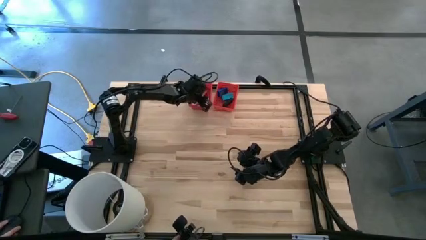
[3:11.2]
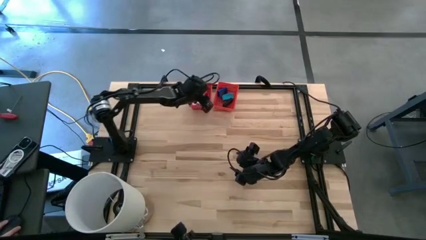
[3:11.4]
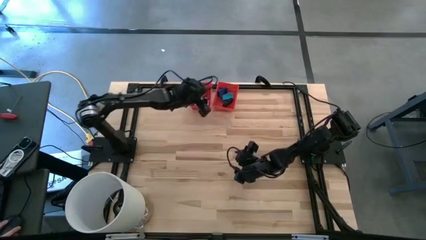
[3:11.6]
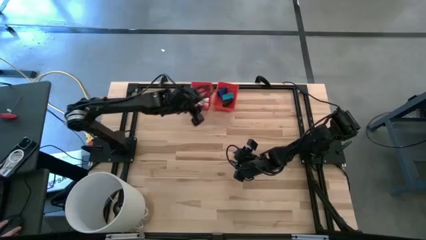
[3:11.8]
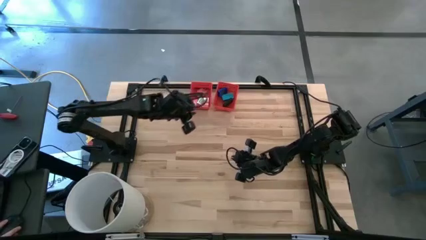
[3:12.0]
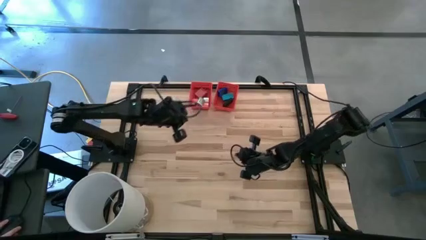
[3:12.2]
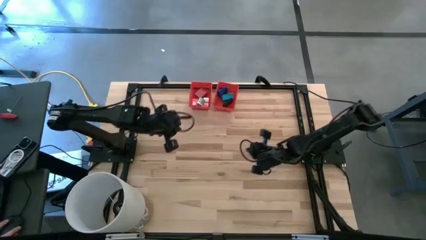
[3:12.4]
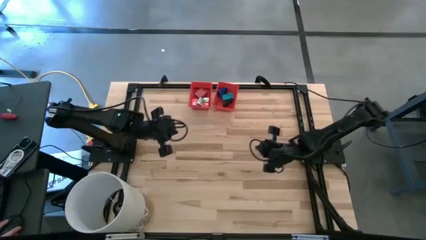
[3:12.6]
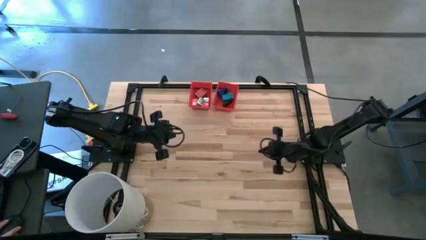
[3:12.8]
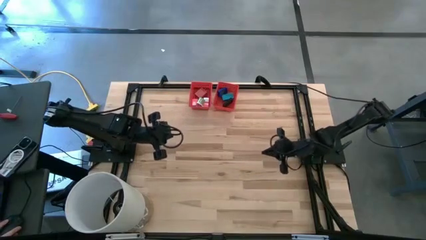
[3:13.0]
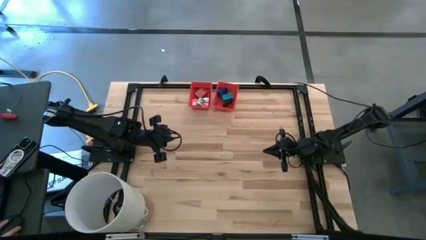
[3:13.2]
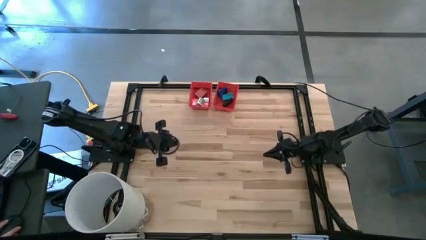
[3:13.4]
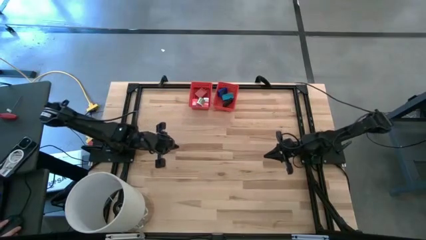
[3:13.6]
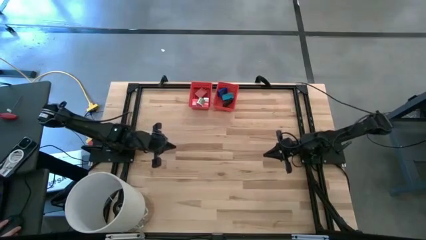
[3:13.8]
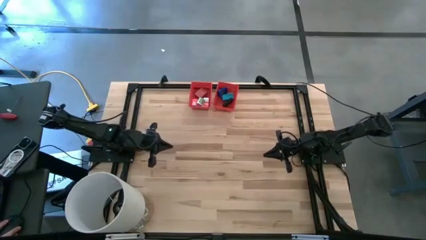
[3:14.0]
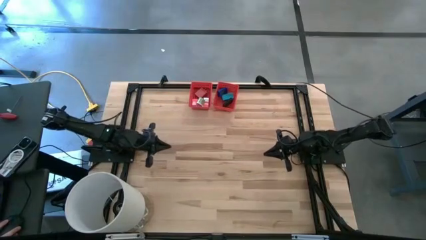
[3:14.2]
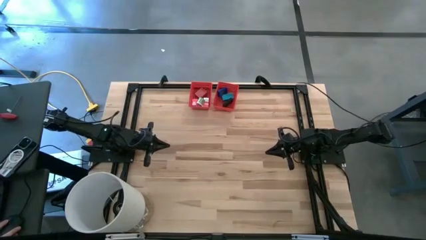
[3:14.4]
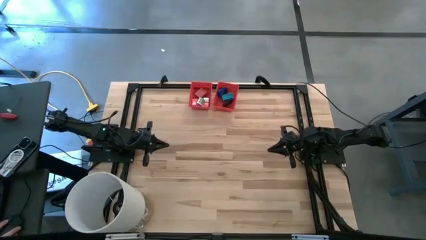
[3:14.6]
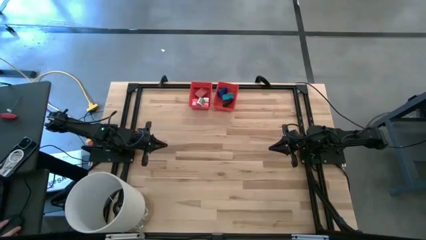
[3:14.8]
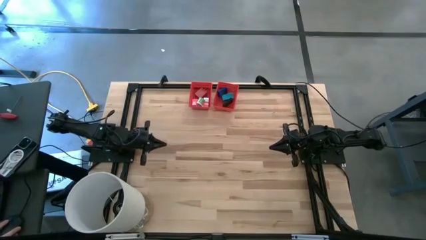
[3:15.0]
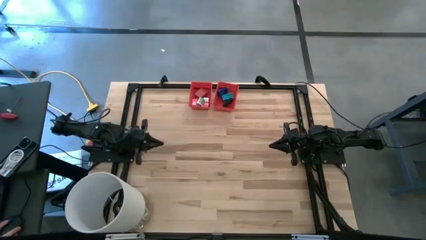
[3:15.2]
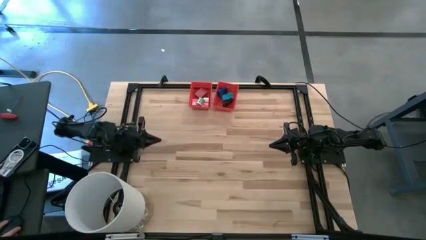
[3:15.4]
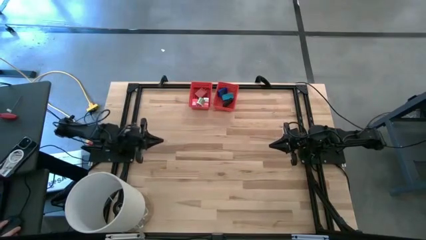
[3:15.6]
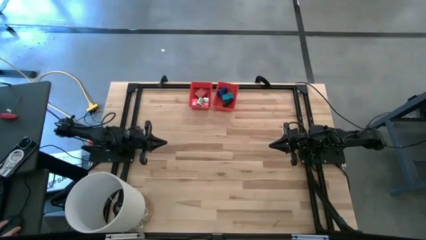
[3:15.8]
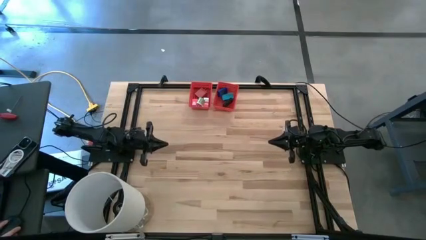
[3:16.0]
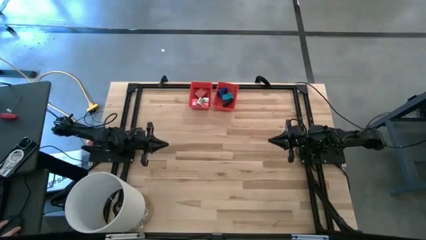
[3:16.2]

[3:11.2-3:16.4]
Task: Pick & Place Office items
Return to Home Position

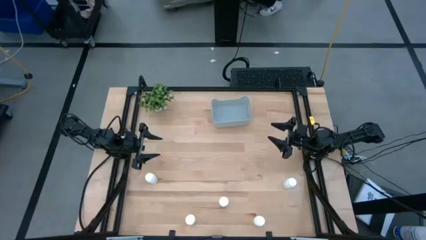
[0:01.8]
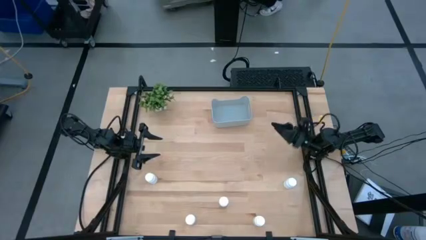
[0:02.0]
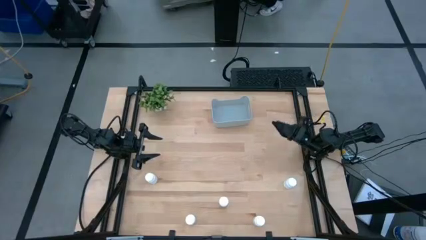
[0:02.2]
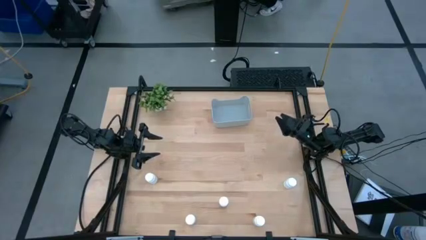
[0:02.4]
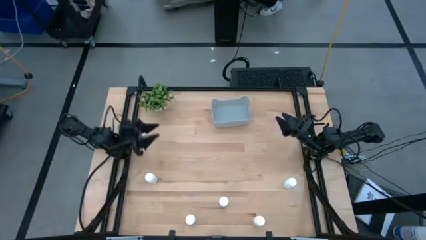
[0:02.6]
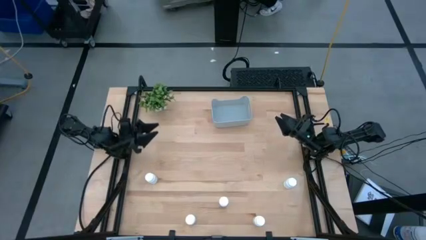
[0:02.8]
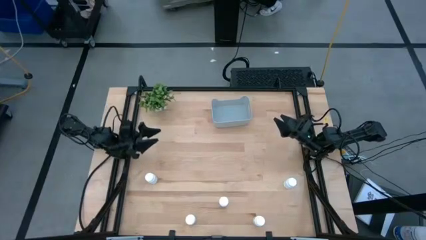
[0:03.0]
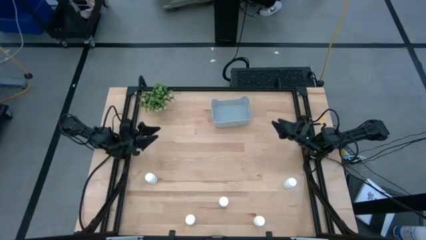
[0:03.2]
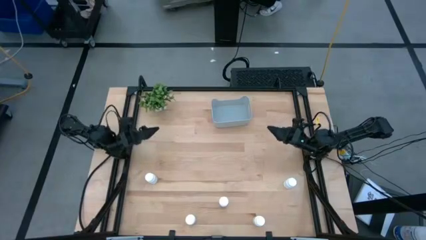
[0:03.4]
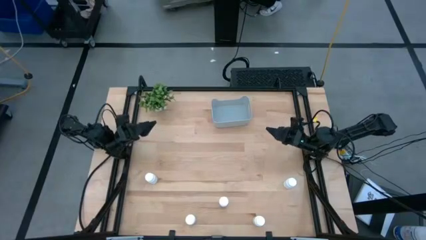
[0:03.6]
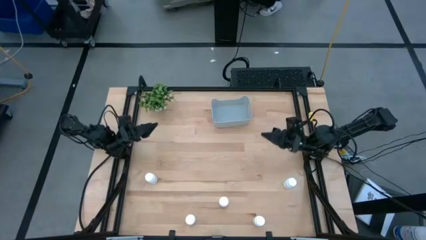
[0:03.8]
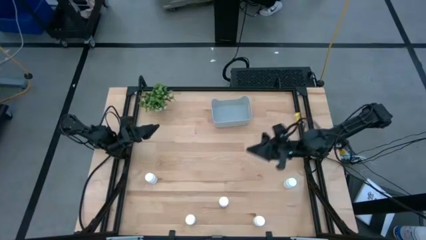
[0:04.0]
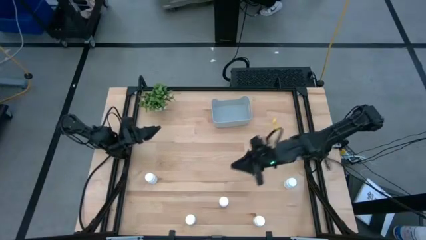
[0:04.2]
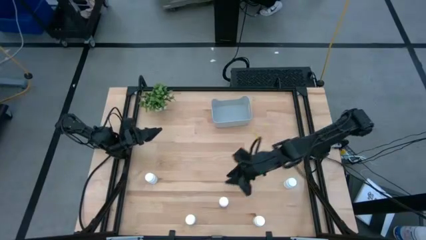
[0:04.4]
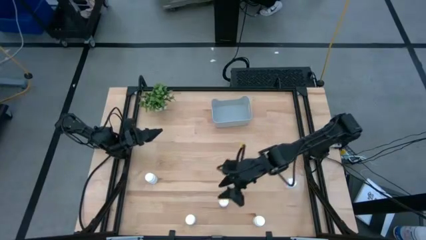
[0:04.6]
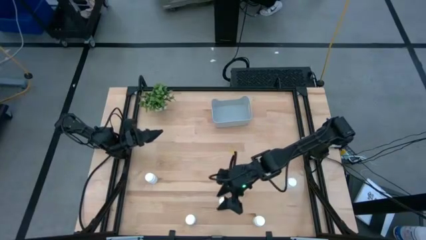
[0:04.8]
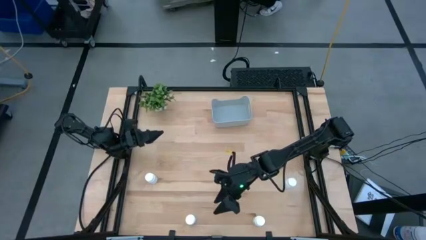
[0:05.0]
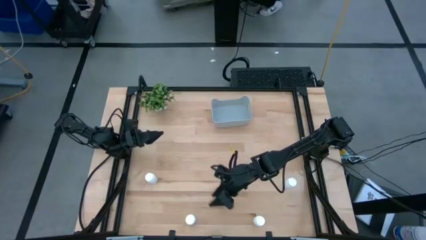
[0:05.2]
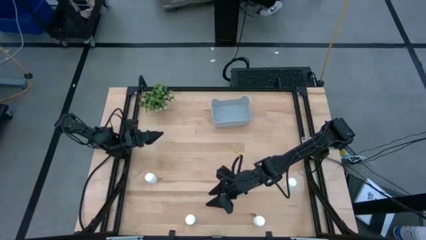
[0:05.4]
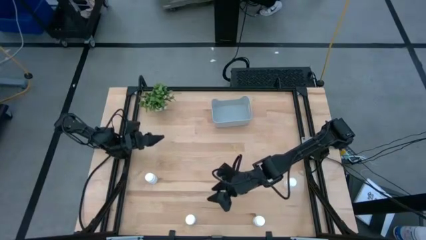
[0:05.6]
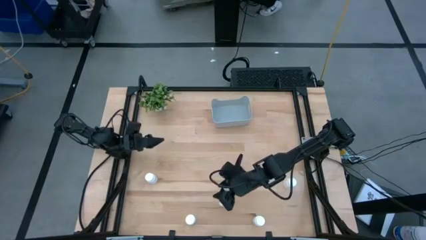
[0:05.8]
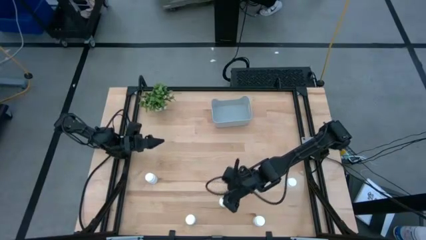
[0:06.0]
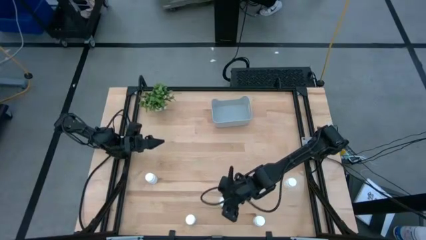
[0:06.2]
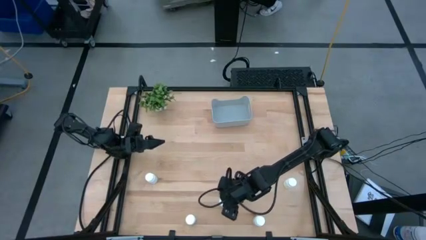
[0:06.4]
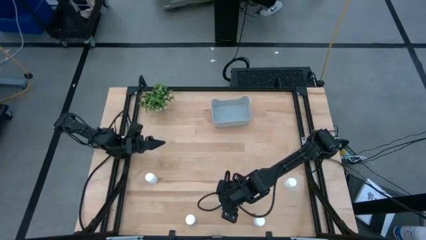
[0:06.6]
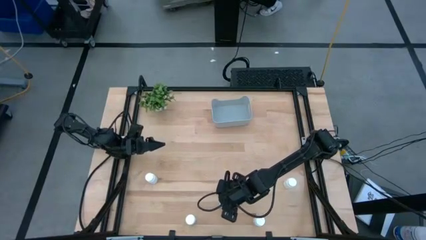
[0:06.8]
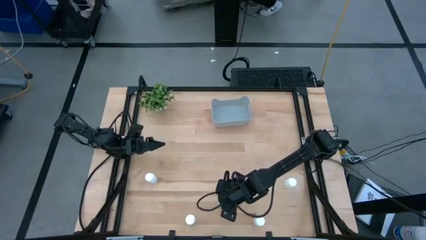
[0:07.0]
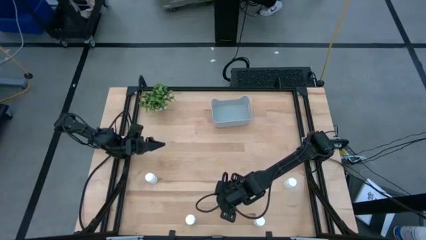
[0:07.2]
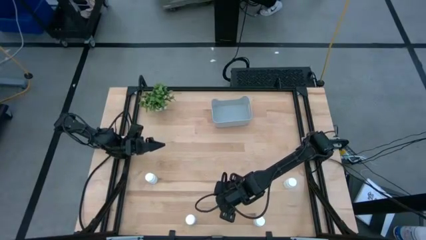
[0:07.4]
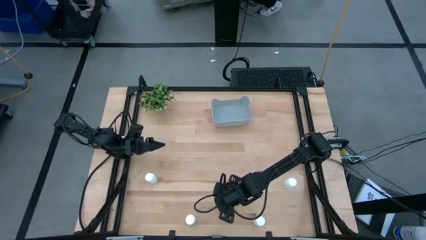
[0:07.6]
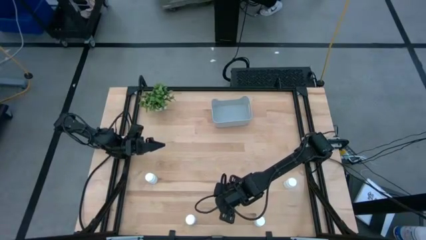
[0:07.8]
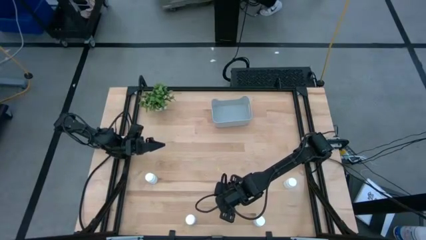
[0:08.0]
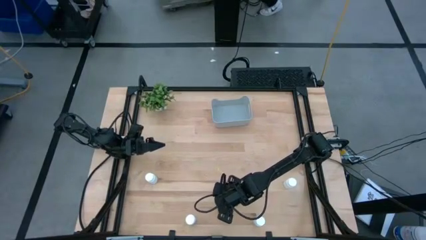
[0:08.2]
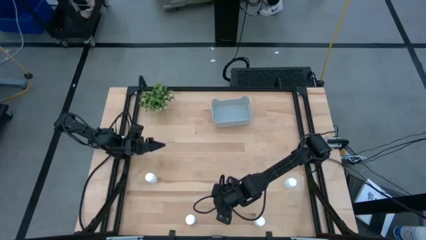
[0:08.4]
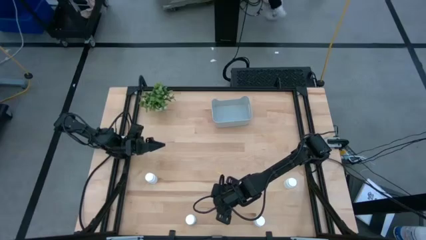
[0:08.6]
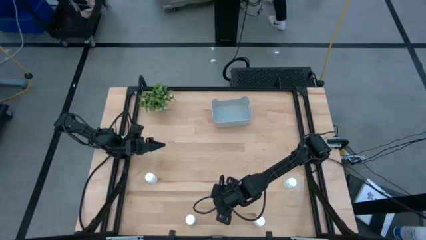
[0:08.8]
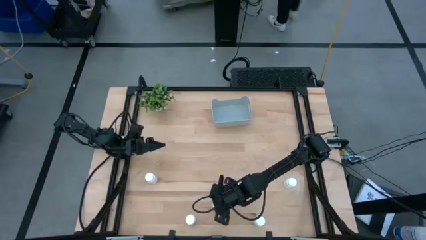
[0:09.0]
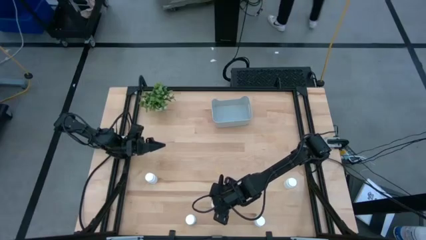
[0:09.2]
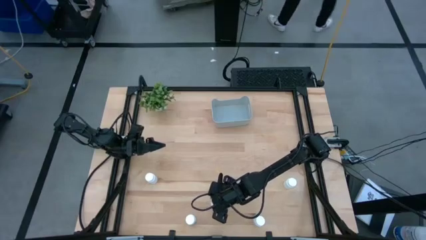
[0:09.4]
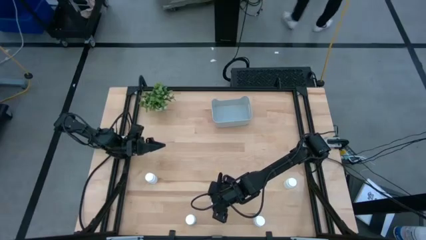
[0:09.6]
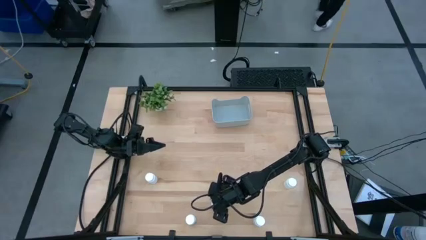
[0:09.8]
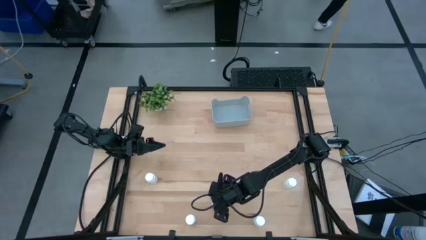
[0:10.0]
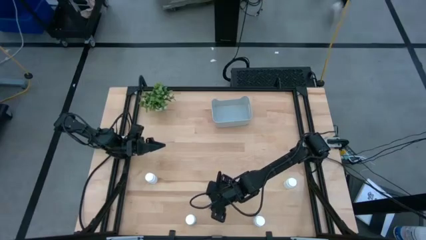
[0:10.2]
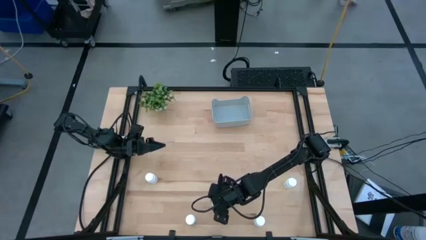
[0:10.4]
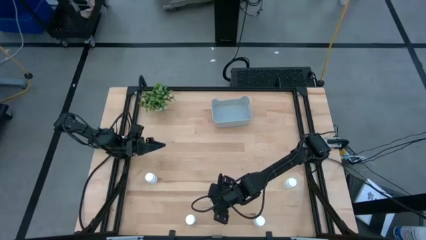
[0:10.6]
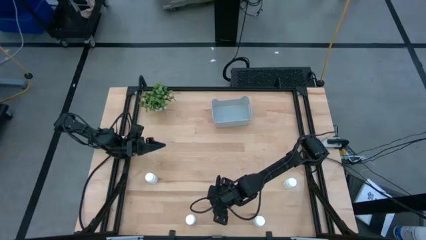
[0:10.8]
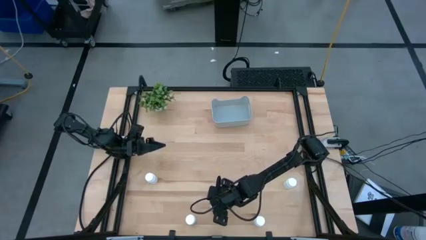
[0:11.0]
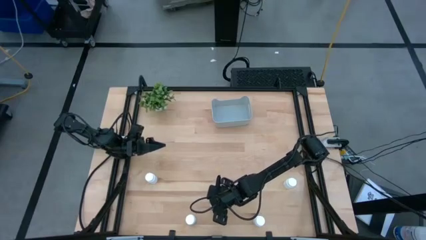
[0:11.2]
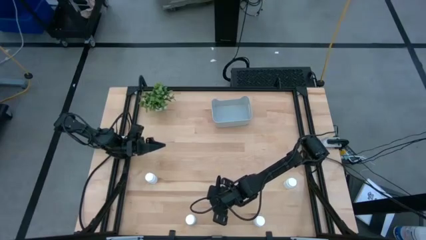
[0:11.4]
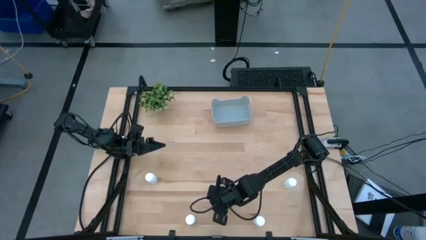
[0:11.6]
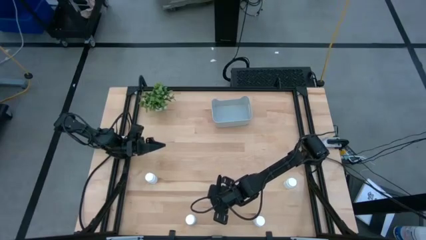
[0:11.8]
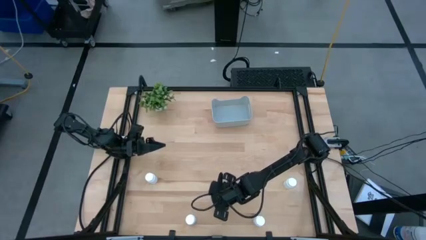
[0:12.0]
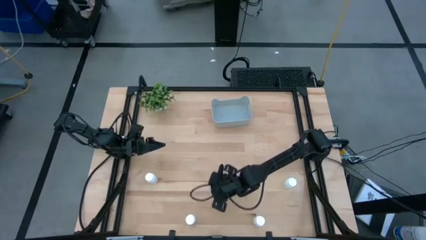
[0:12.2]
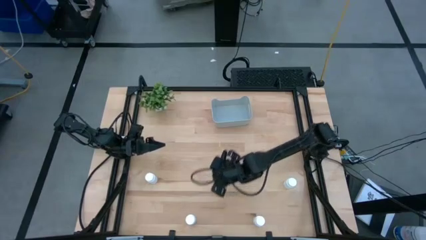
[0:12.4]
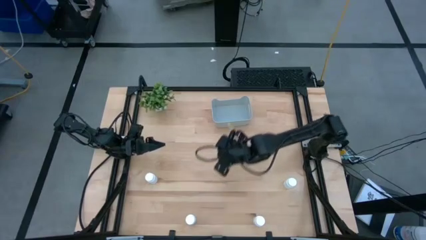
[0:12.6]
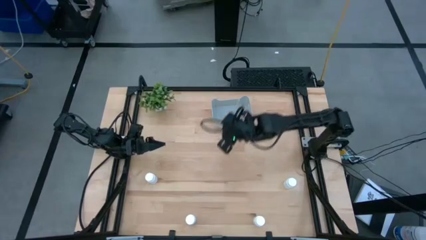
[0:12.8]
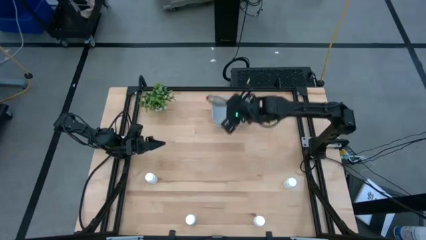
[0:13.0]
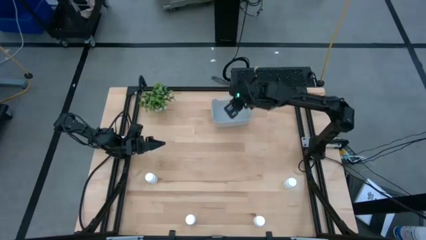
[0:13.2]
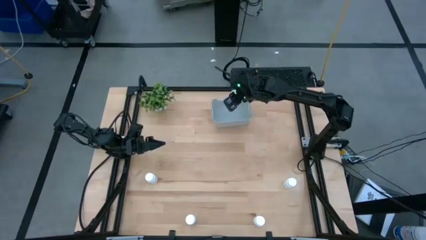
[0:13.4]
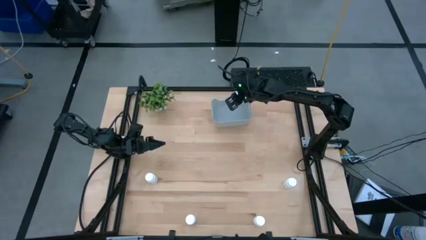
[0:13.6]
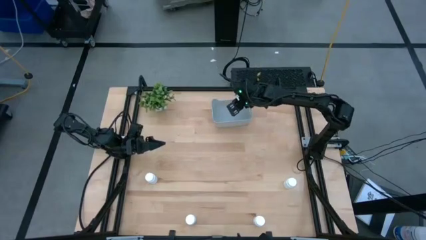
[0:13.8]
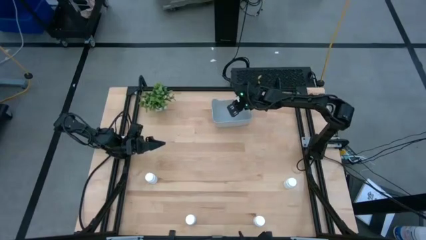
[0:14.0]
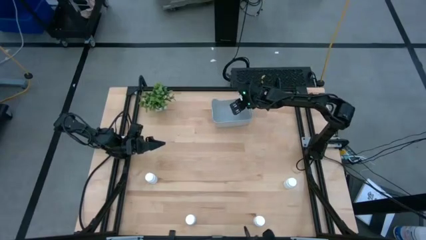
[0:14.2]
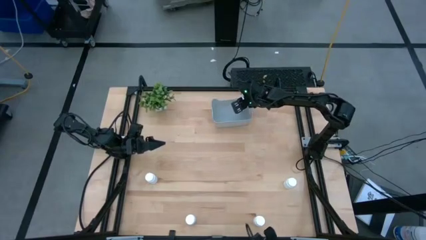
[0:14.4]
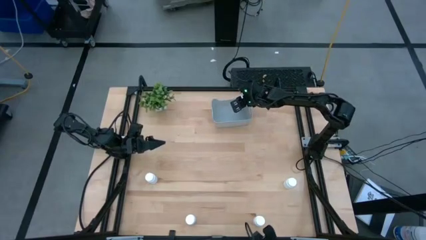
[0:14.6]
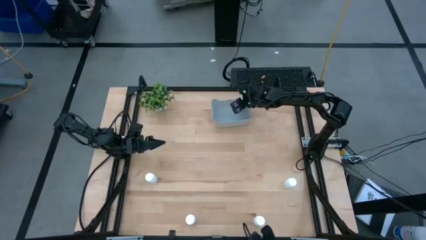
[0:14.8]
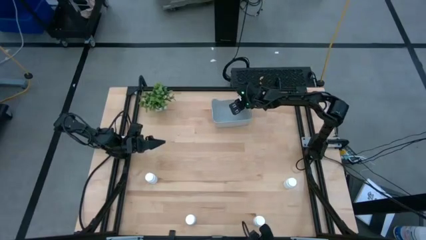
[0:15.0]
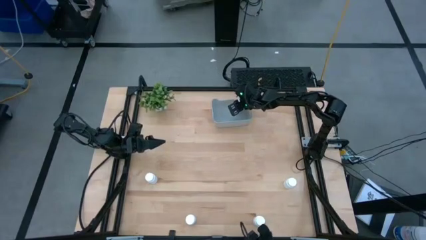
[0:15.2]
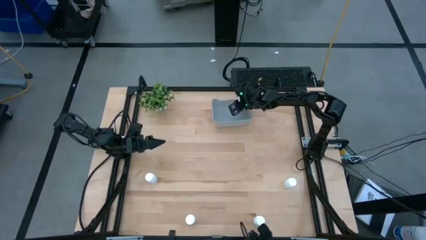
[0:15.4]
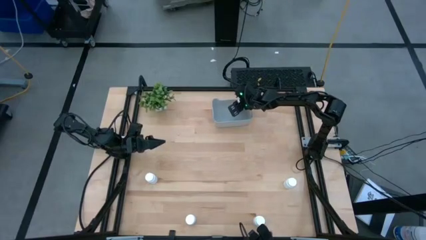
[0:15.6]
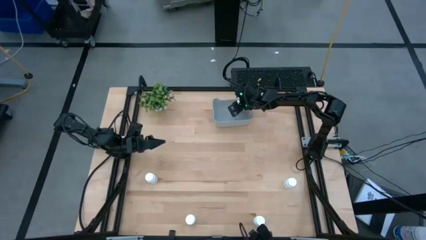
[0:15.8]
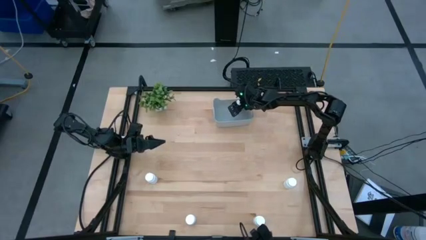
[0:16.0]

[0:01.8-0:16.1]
Task: Pick and place pill bottles into a basket
Put the white pill bottle into the gray container
